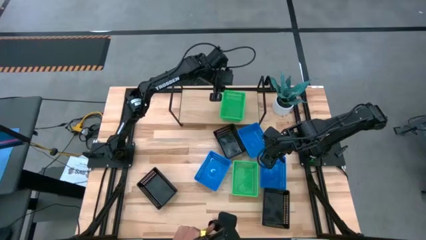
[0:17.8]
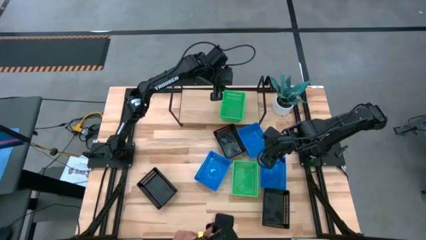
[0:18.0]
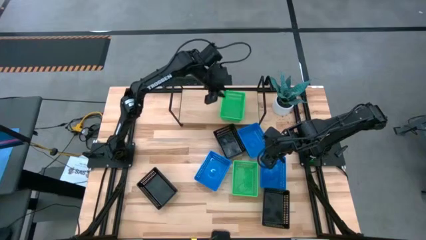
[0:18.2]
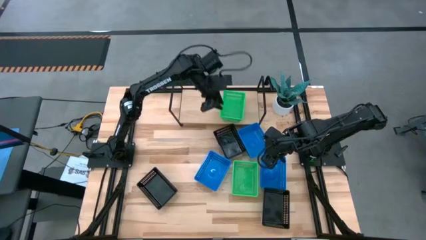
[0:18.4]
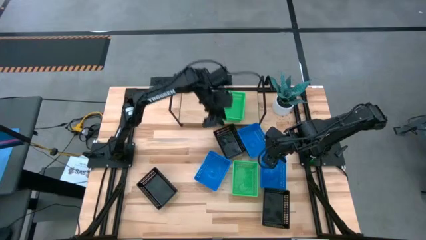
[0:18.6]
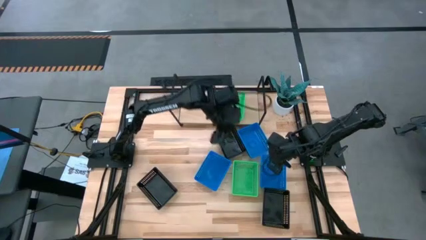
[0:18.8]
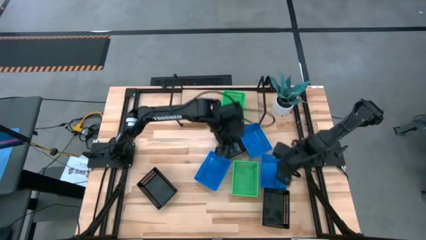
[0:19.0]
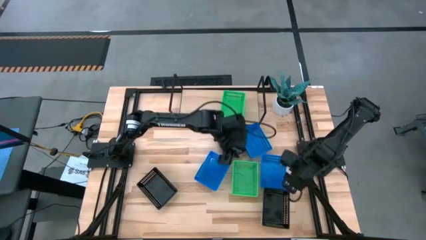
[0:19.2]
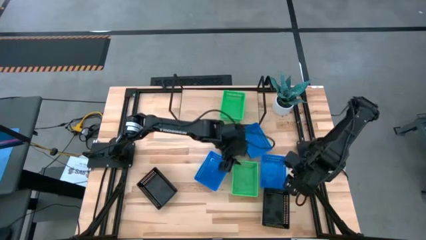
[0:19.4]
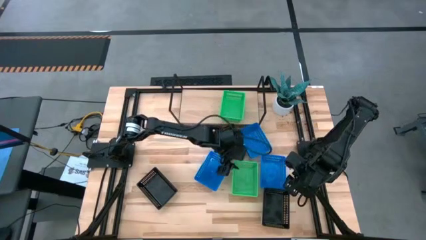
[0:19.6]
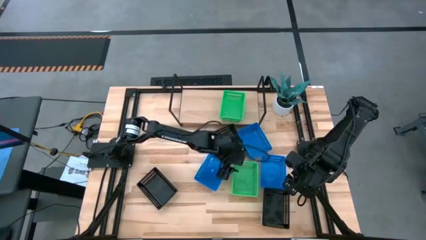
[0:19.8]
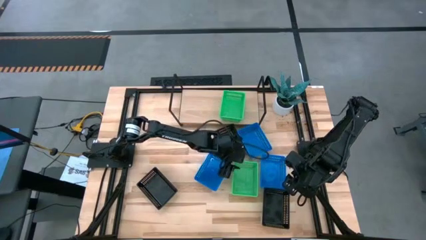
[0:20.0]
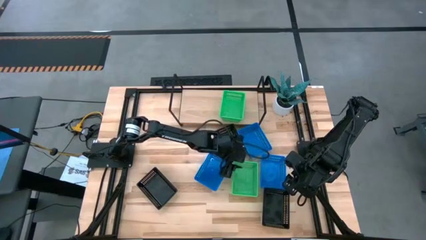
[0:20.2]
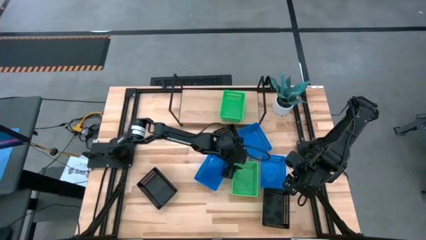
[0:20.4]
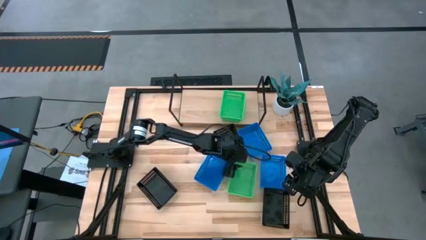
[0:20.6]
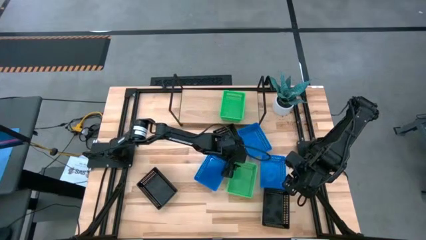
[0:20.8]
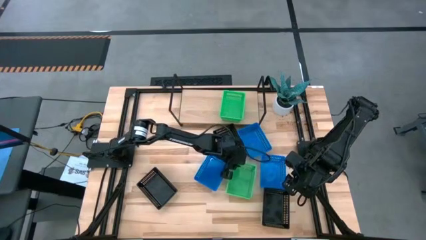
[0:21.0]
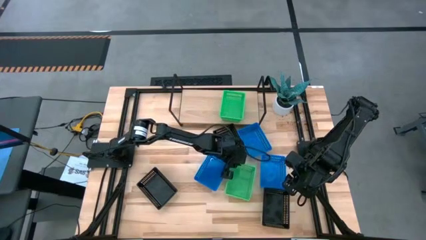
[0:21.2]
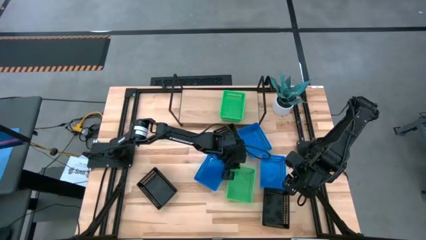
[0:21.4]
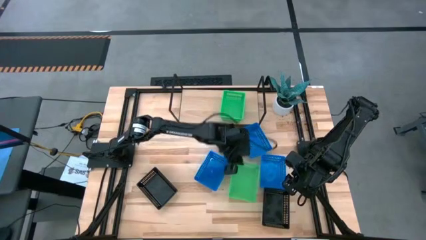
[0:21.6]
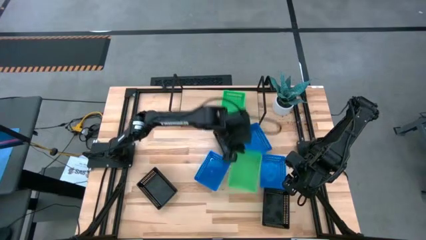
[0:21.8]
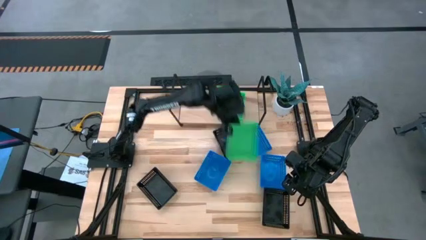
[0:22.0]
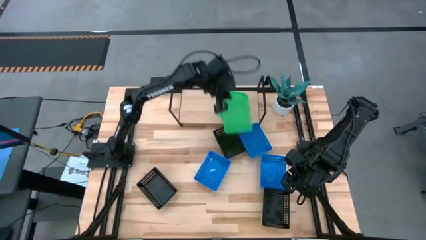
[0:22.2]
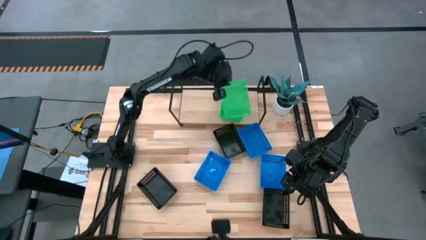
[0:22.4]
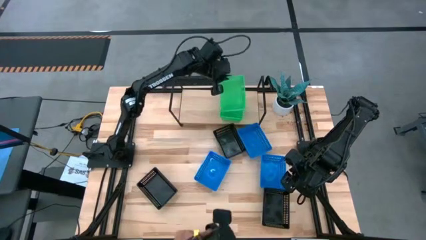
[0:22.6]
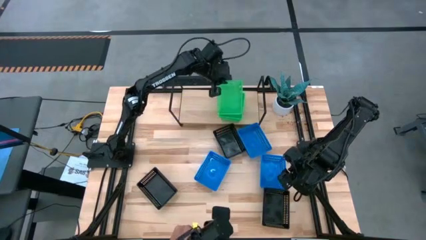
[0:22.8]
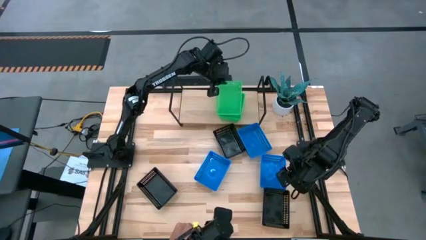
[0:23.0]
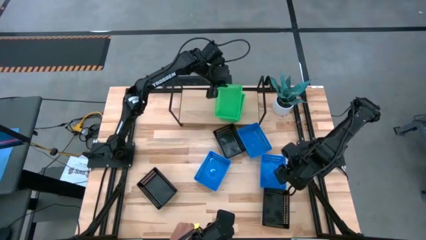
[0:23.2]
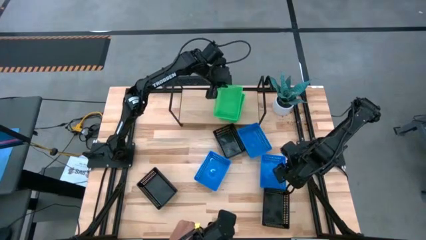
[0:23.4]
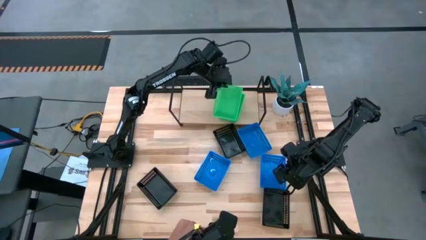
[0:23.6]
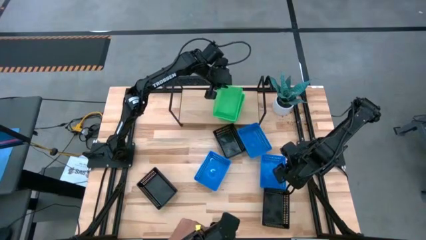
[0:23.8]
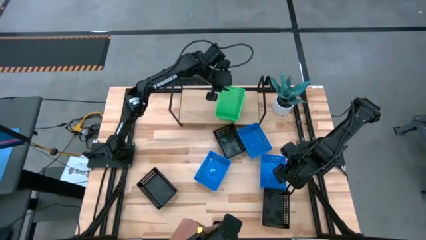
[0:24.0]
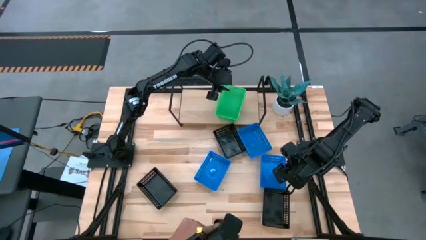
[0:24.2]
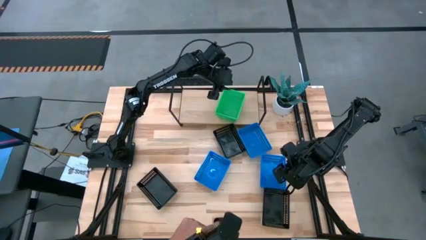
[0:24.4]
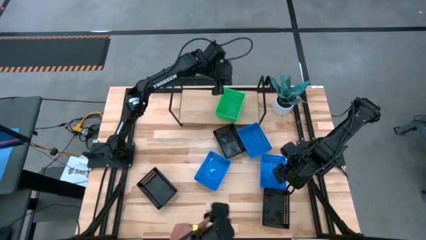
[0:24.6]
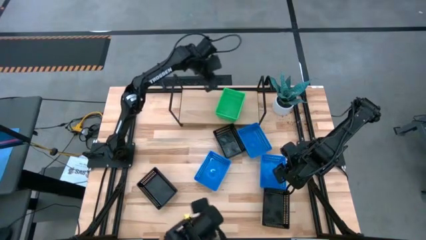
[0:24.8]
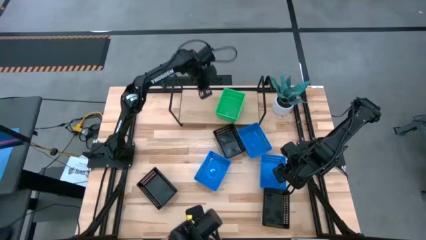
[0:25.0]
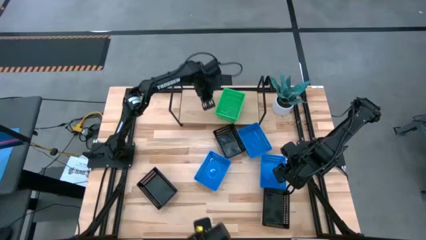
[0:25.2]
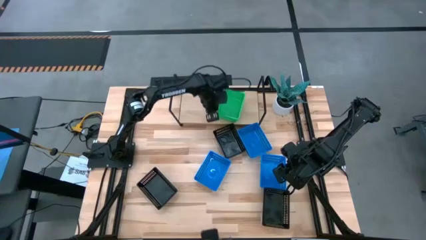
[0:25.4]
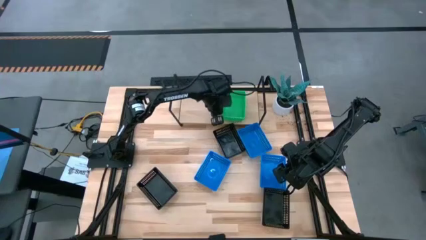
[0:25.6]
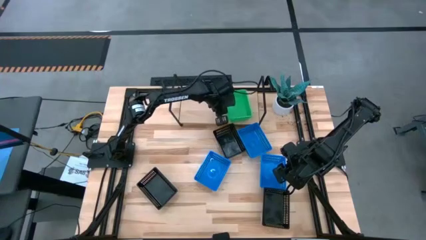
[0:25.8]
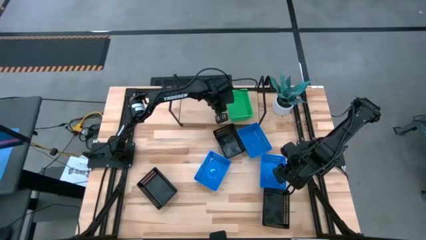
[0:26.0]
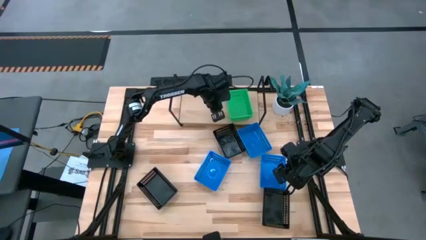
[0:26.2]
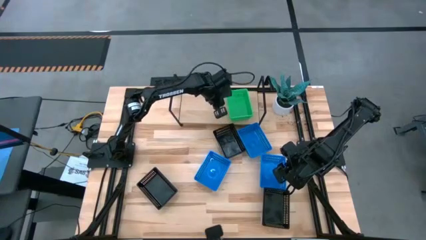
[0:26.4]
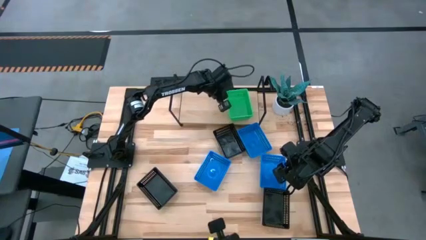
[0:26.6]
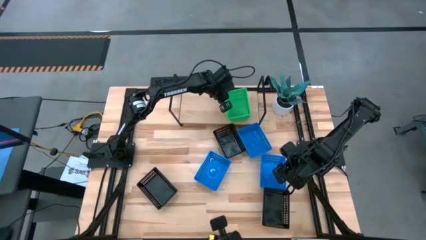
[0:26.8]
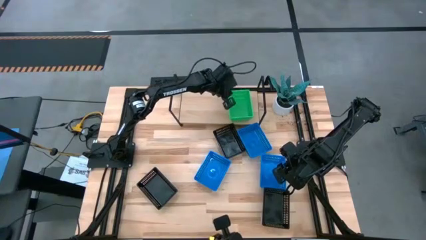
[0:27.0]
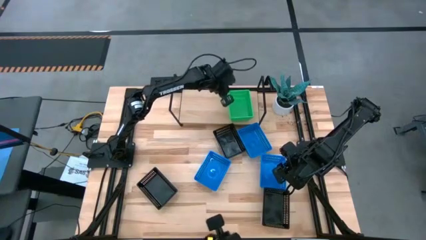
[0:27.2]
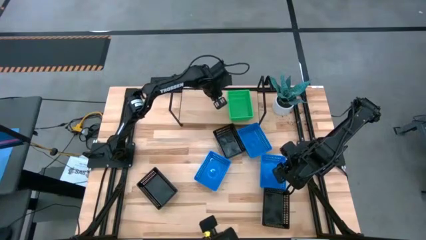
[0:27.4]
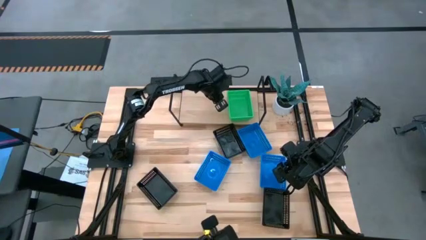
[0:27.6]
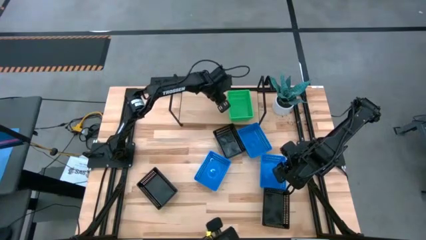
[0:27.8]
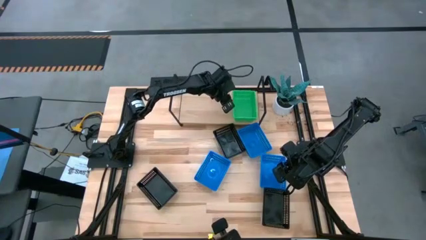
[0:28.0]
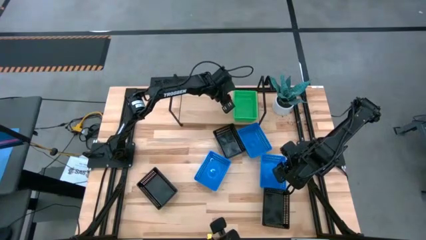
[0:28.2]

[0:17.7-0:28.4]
Task: Stack baskets on shelf by color
Stack the green bin on top of the other green bin on the shelf

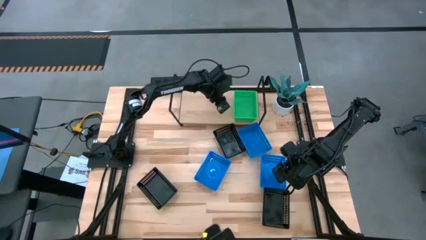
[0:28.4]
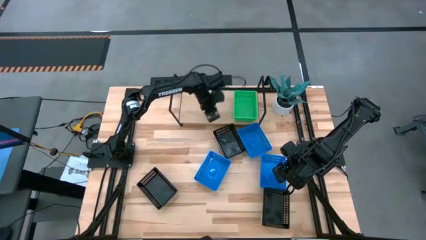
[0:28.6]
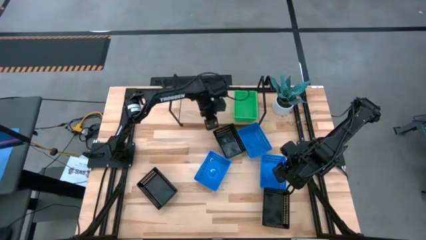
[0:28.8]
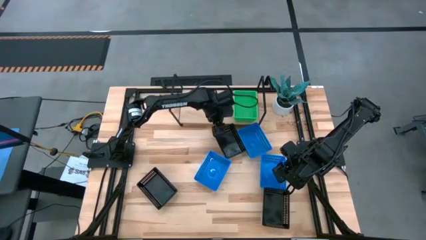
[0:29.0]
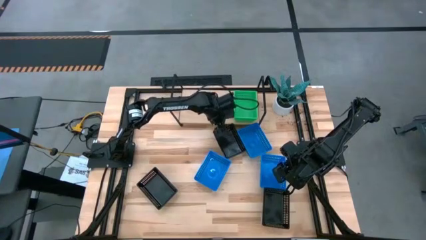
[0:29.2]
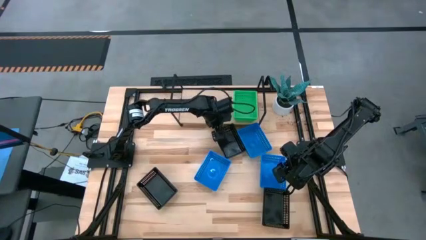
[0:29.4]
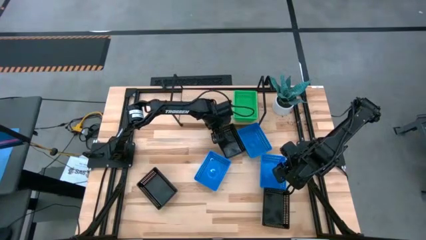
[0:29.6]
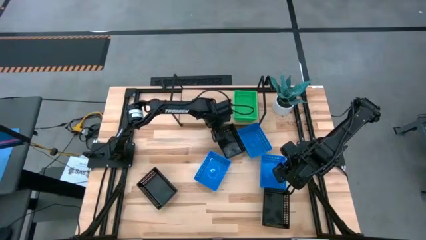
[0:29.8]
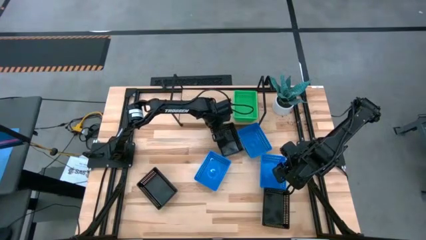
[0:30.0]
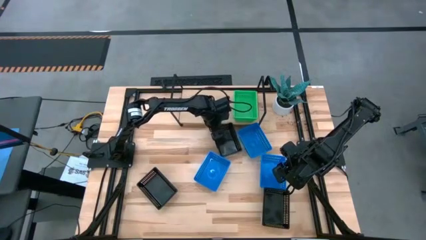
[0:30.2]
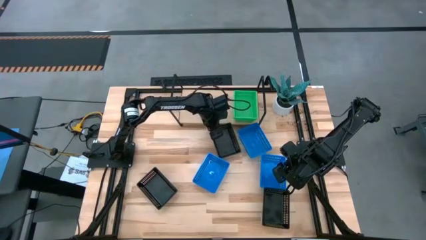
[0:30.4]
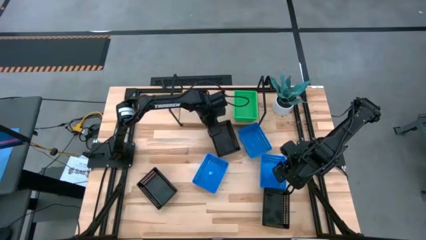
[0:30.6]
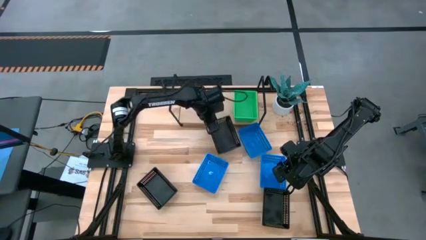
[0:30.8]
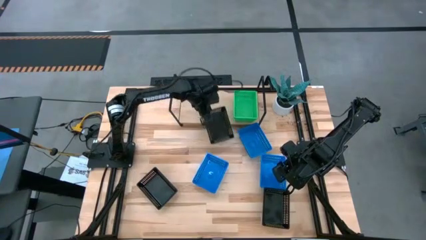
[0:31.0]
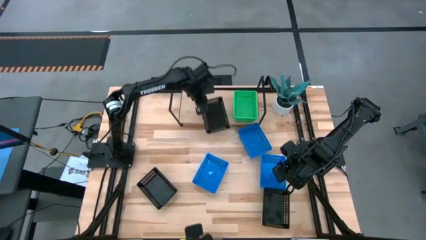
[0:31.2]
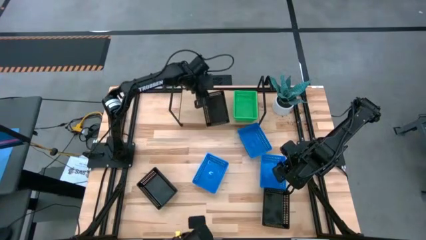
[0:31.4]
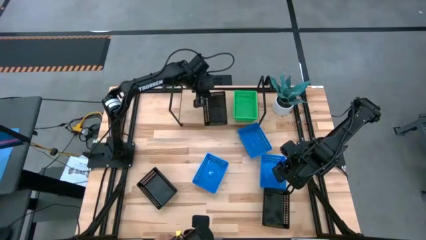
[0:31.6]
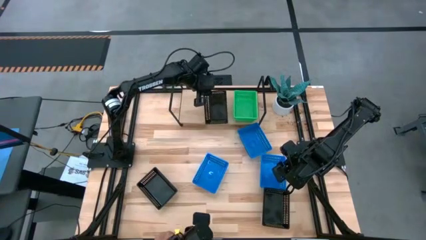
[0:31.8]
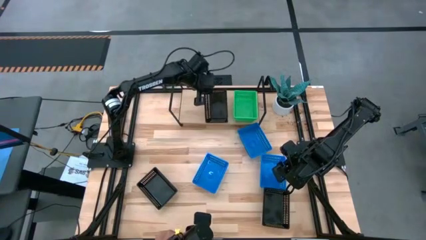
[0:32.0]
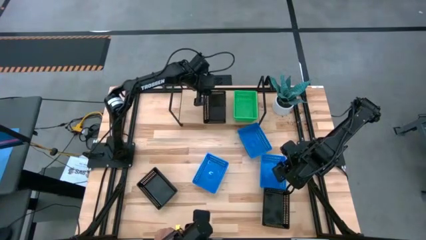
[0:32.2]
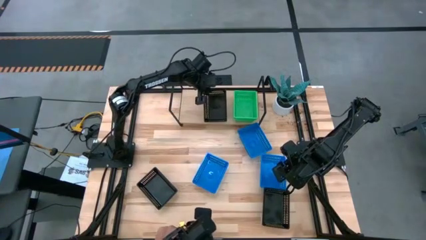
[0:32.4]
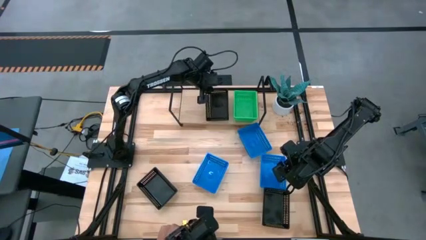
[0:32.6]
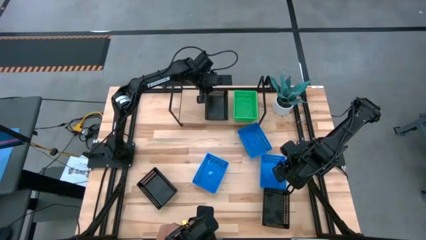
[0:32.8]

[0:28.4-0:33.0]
Put the top black bin on the shelf

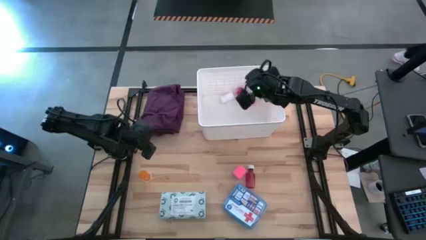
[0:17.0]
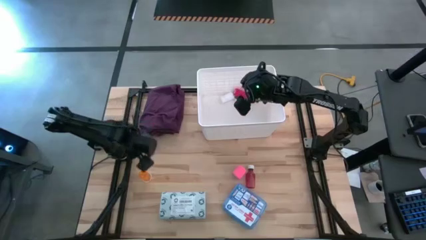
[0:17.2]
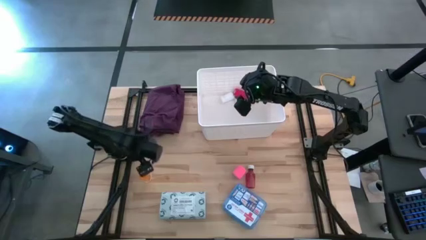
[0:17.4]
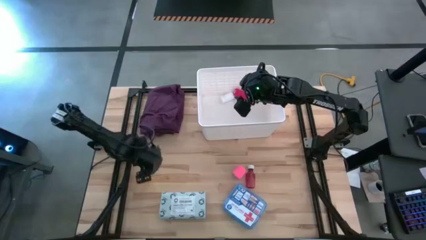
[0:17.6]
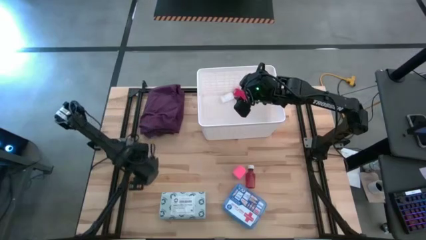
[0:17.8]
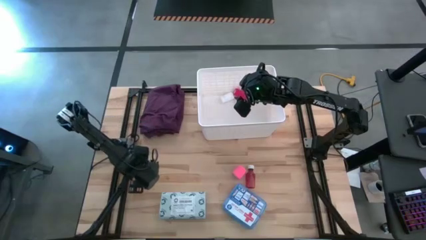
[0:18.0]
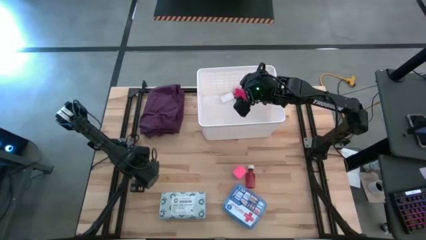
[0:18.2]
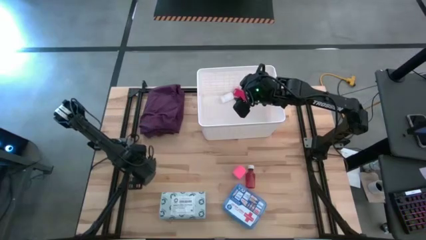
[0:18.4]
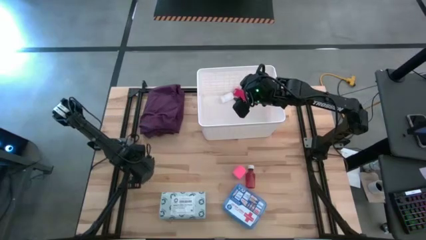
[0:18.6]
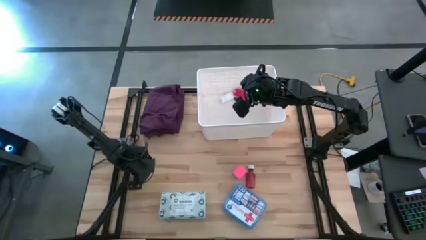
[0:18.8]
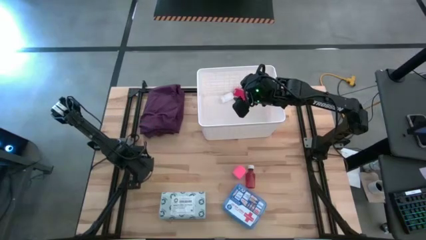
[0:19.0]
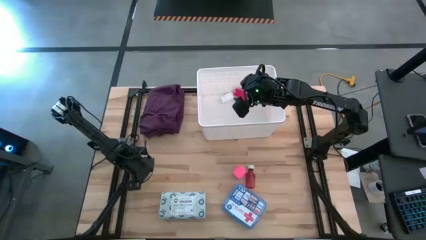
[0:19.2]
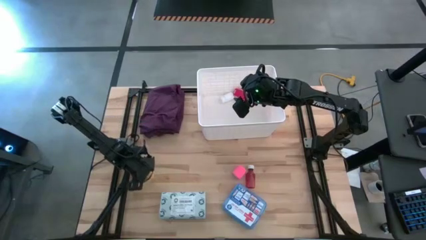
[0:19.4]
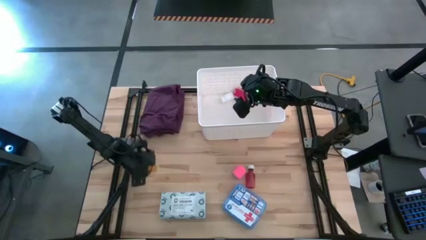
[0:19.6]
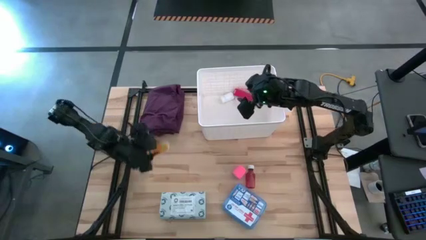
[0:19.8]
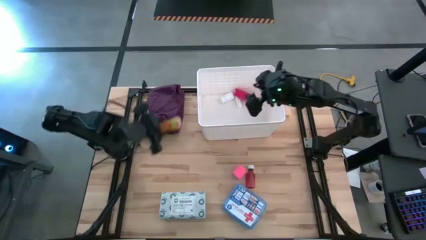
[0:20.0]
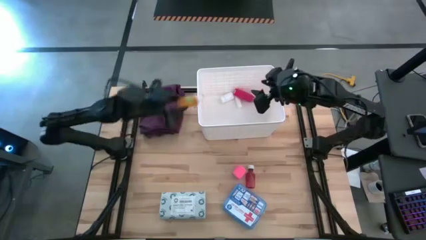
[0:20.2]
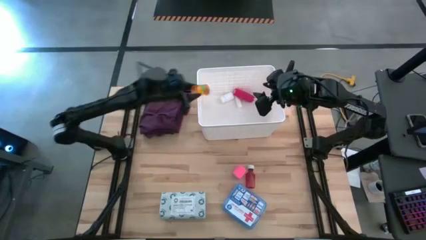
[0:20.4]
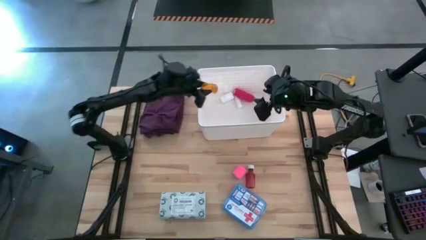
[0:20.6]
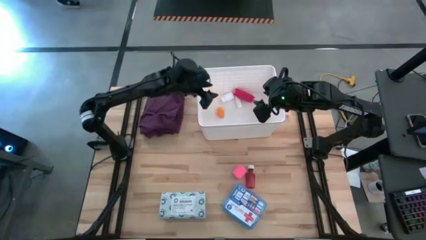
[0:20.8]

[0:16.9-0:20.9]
Task: Pick & place medical supplies in basket/bin
Put the pill bottle into the bin
